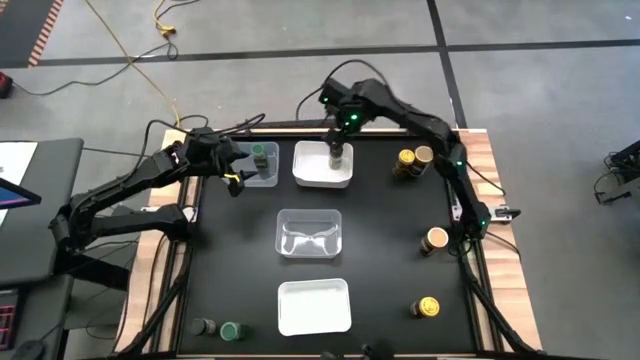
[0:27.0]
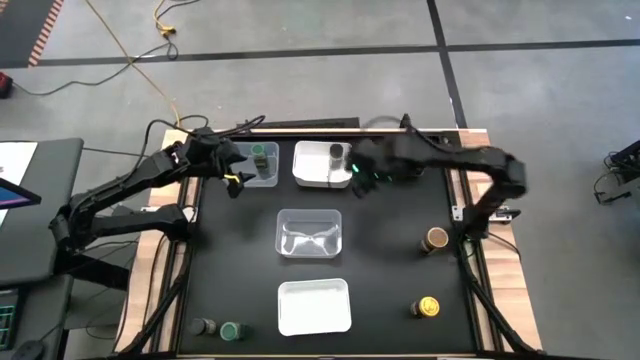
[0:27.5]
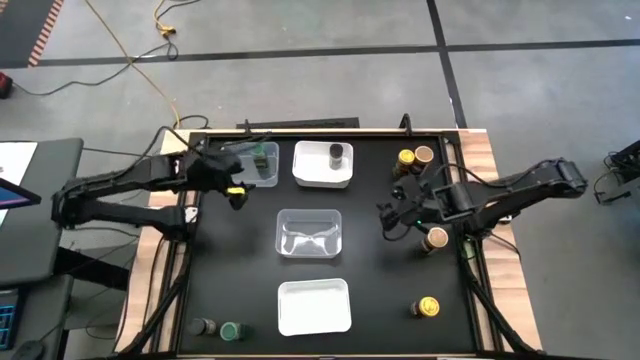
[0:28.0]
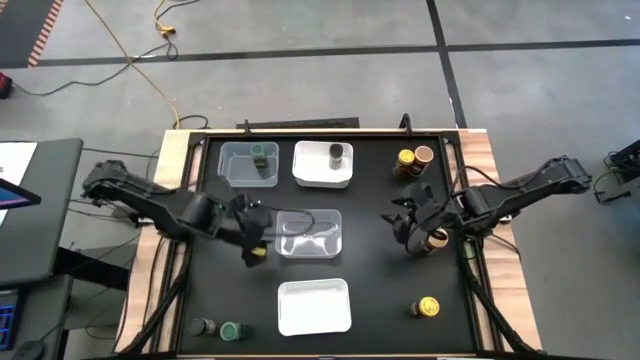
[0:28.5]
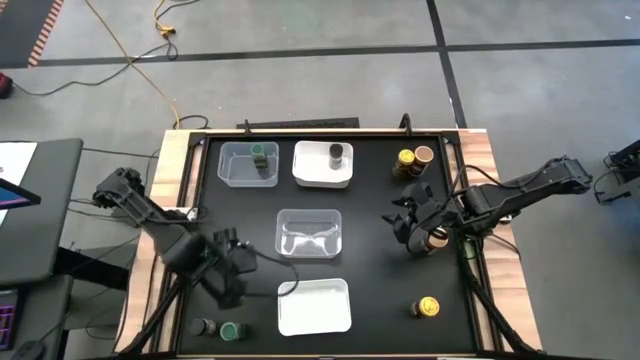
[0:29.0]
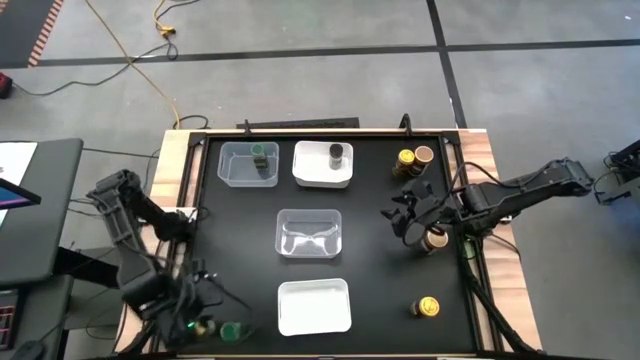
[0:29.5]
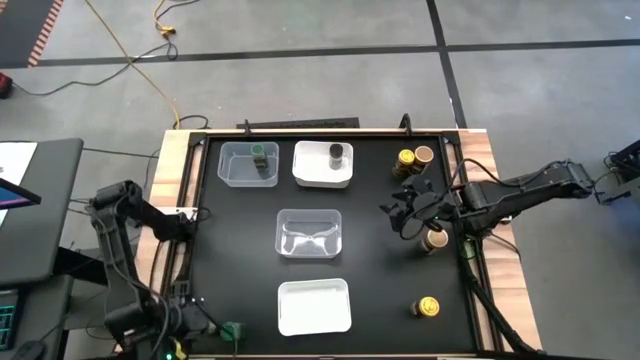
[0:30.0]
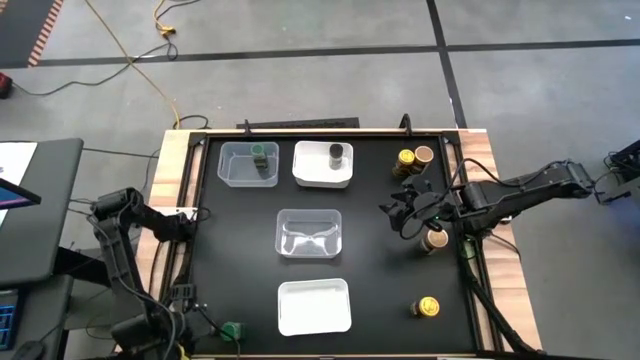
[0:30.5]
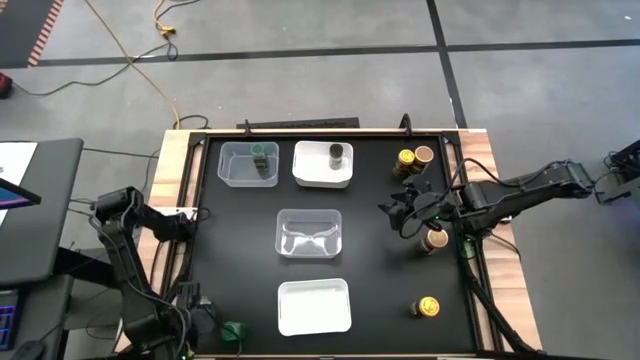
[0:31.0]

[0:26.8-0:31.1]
Task: Sort spices by type
Put the black seasoning bottle into the top white bin

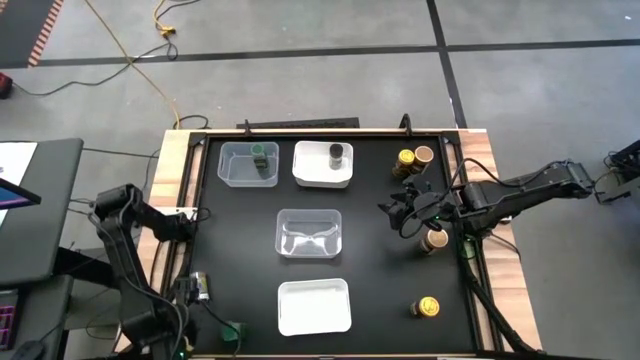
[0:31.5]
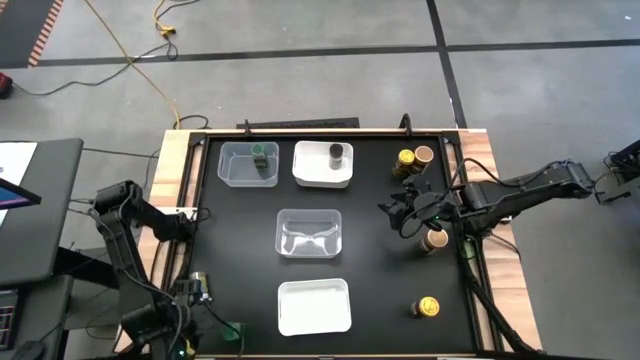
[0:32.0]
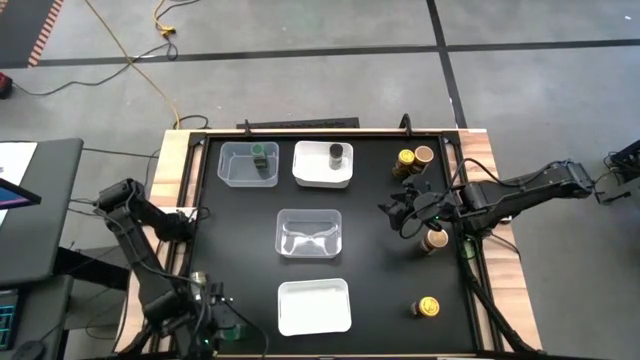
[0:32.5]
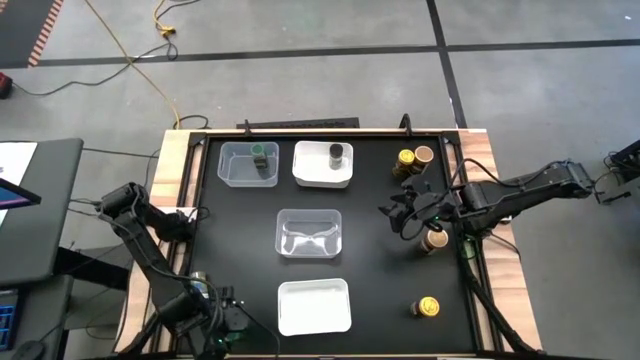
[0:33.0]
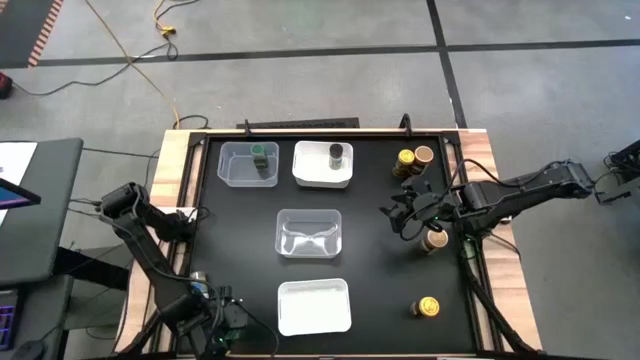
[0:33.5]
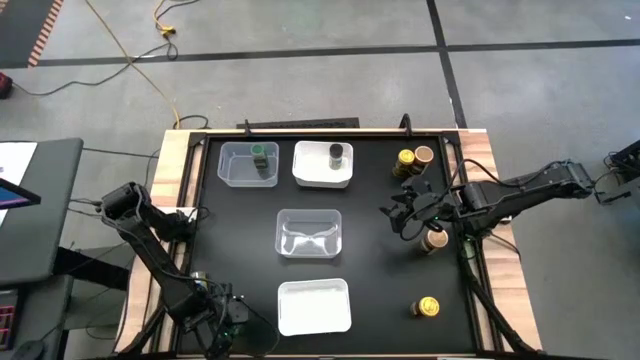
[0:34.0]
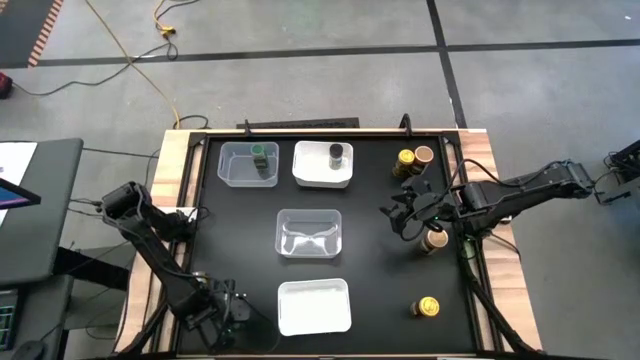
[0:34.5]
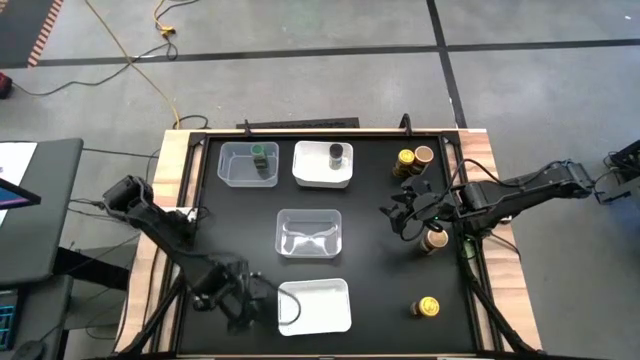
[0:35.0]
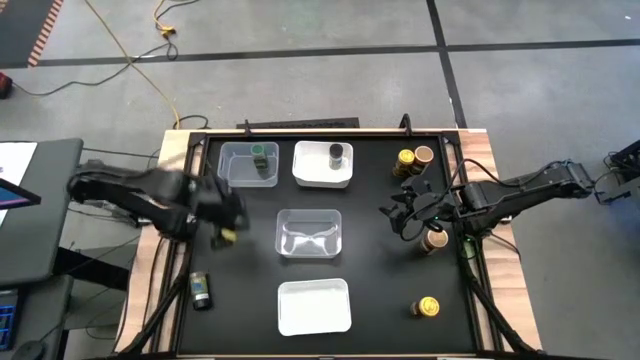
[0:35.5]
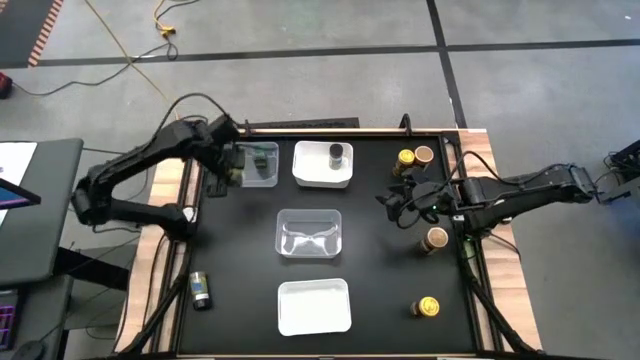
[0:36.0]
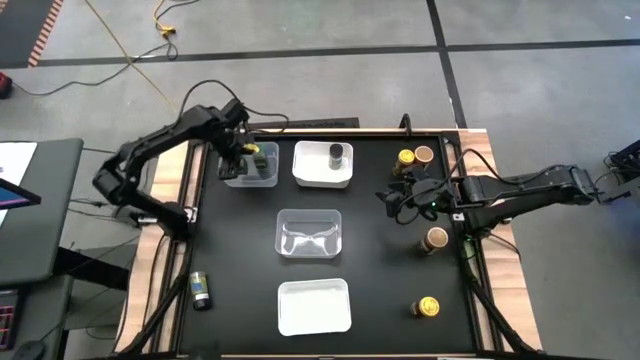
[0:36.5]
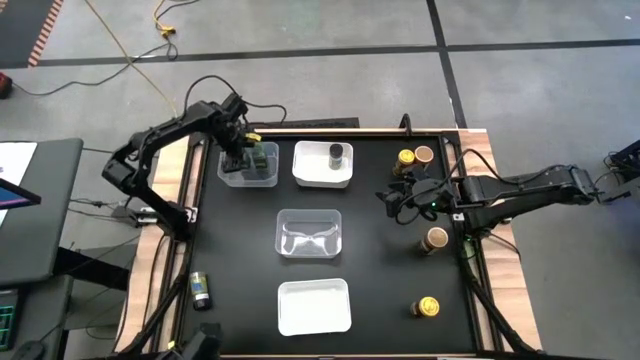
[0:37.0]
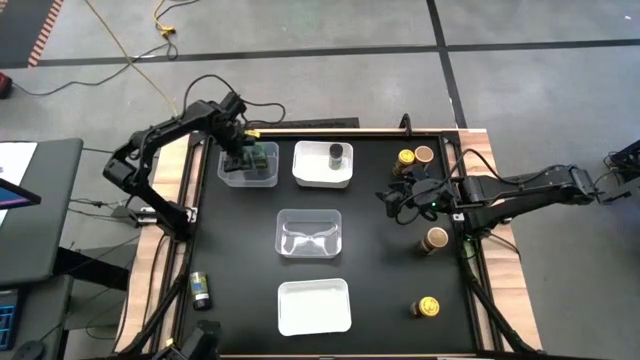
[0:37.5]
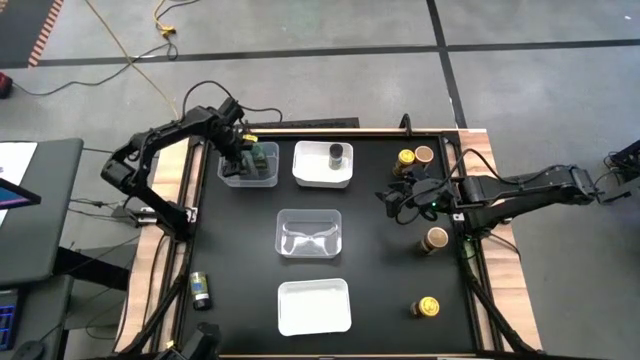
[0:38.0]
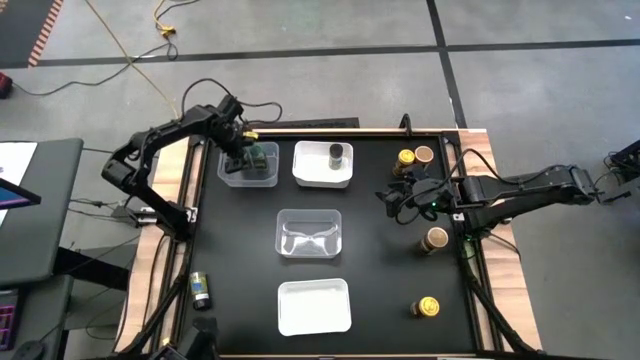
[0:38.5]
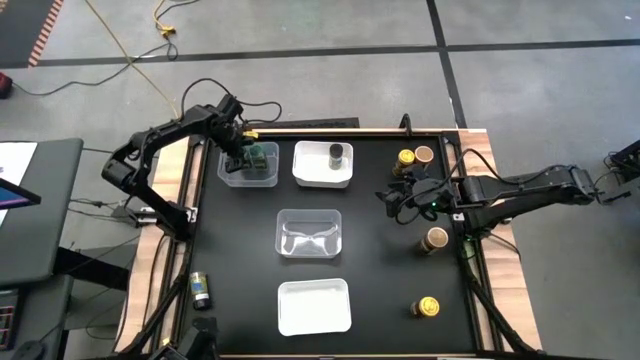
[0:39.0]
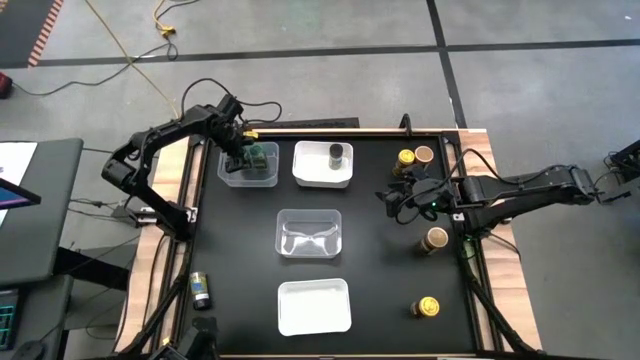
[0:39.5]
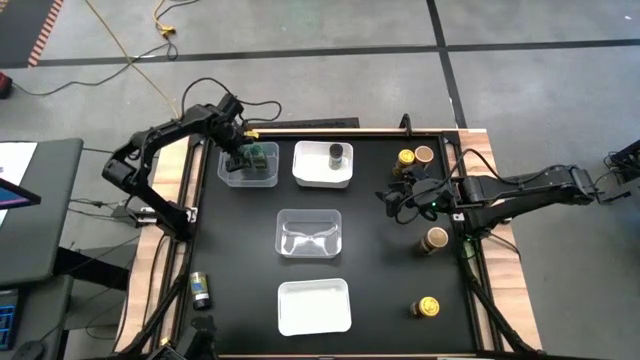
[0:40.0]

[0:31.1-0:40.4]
Put the green seasoning bottle into the top transparent bin

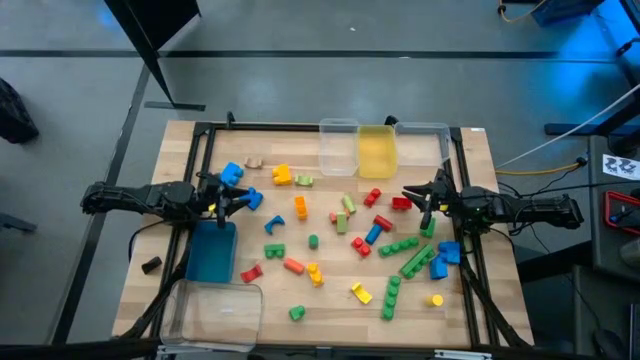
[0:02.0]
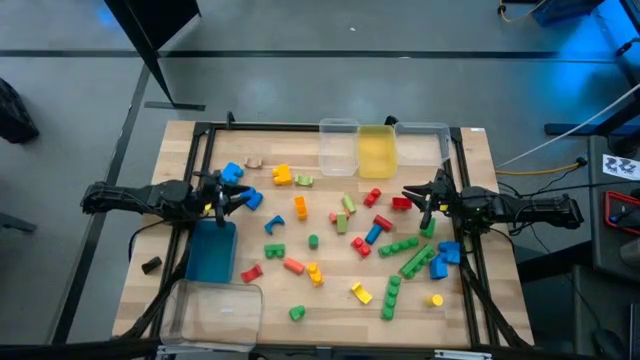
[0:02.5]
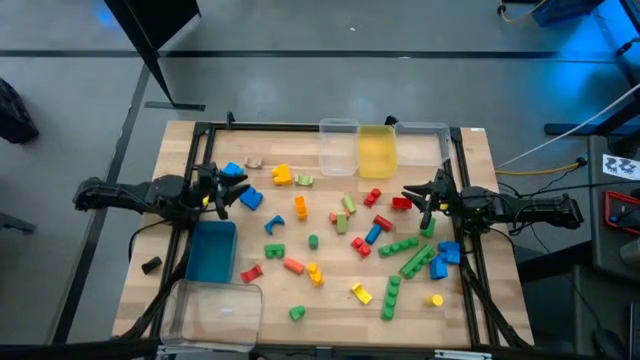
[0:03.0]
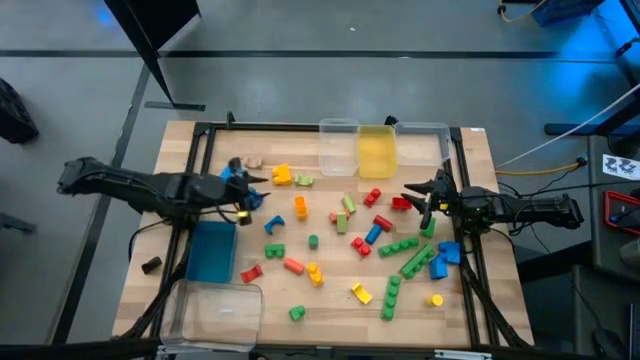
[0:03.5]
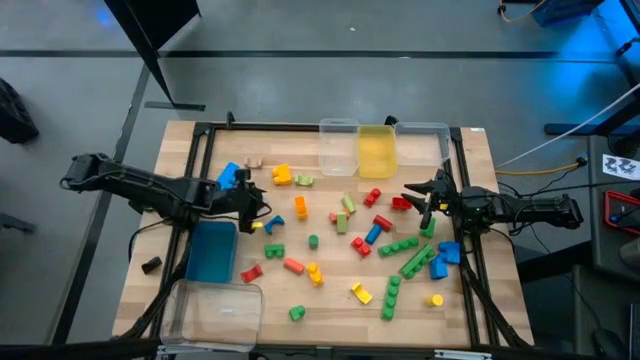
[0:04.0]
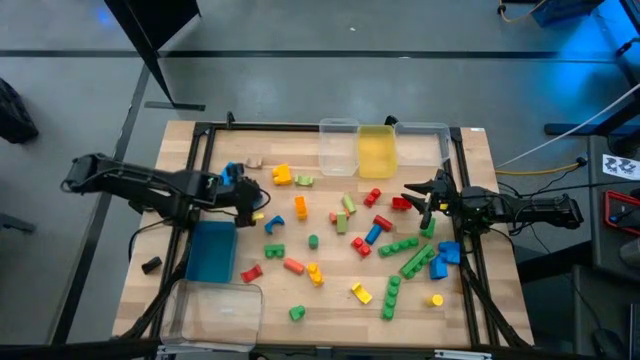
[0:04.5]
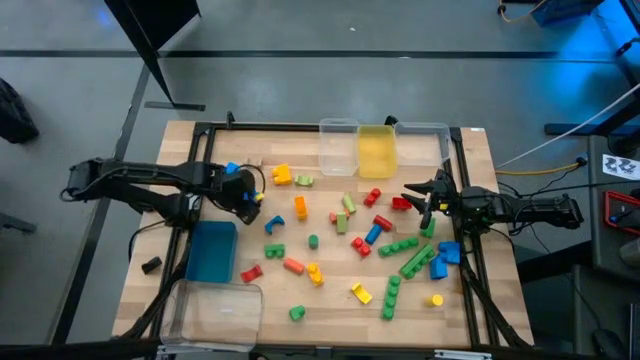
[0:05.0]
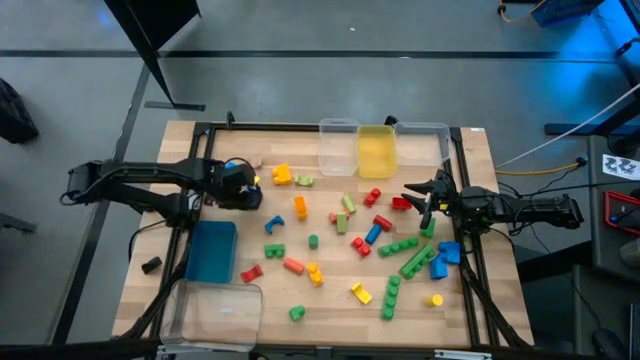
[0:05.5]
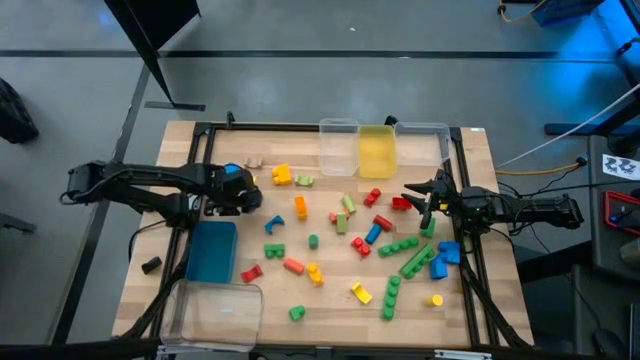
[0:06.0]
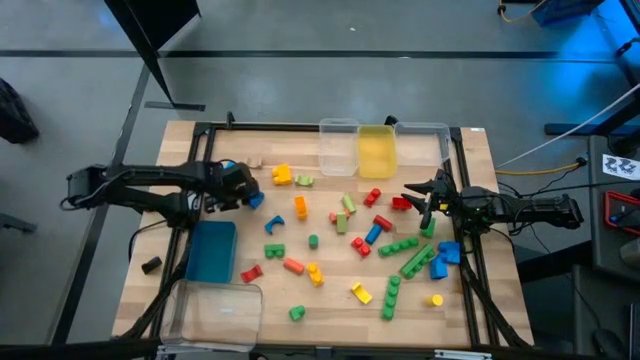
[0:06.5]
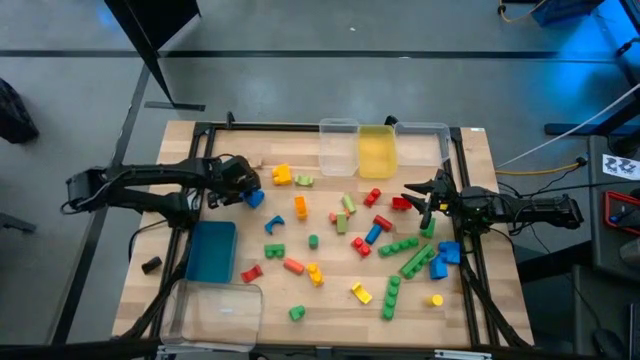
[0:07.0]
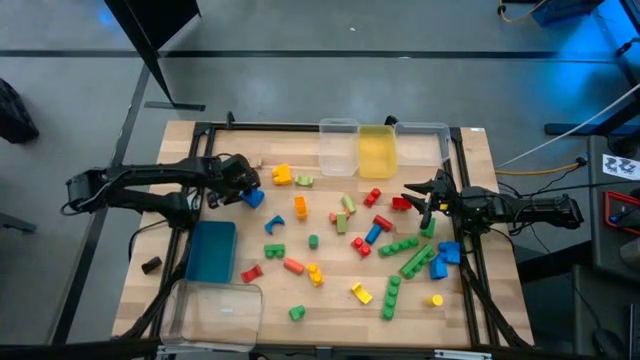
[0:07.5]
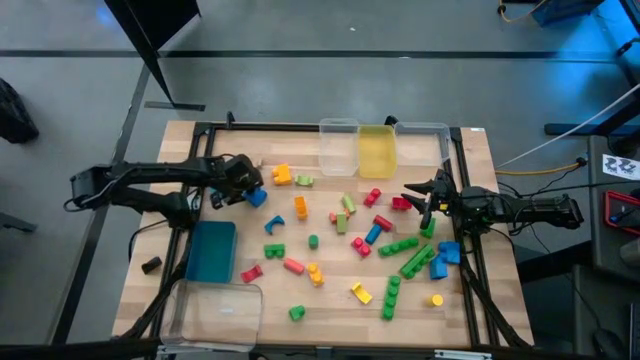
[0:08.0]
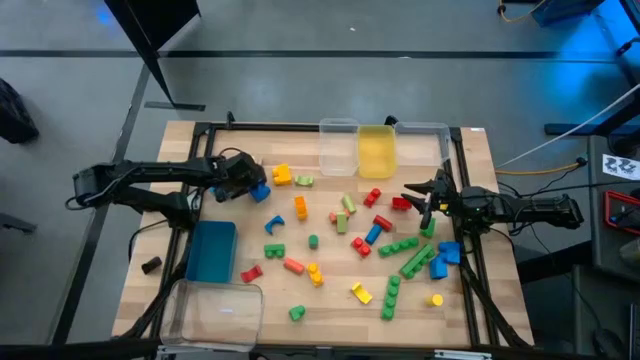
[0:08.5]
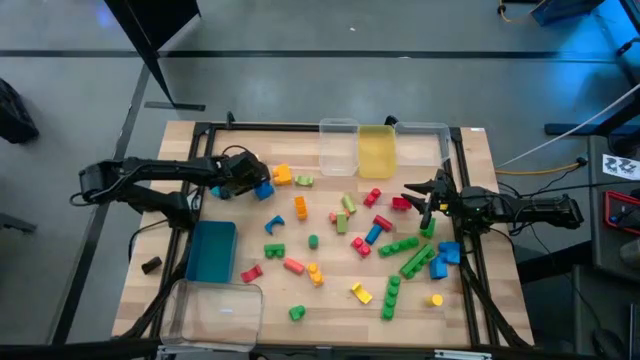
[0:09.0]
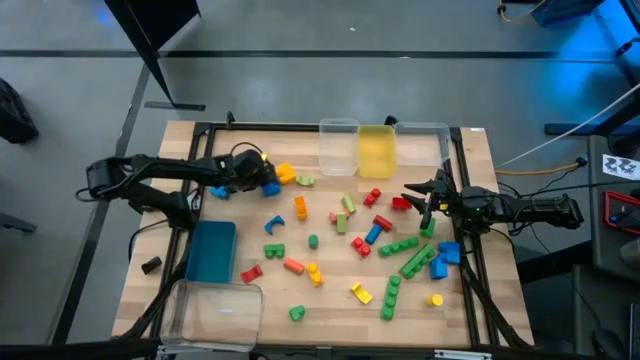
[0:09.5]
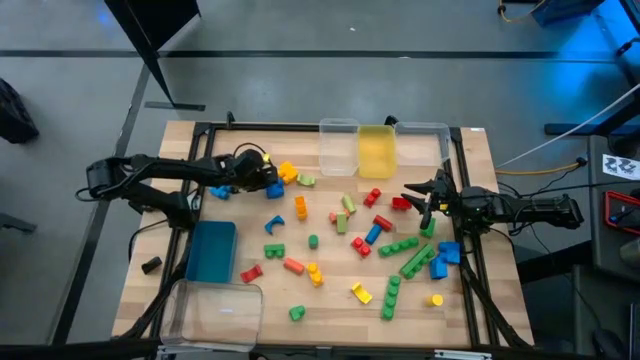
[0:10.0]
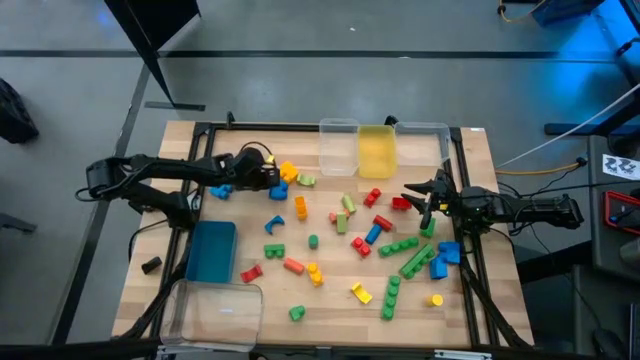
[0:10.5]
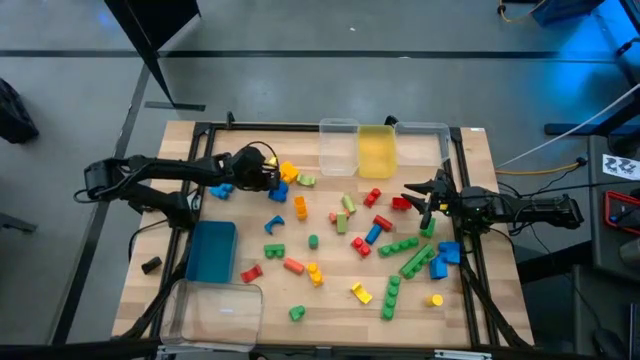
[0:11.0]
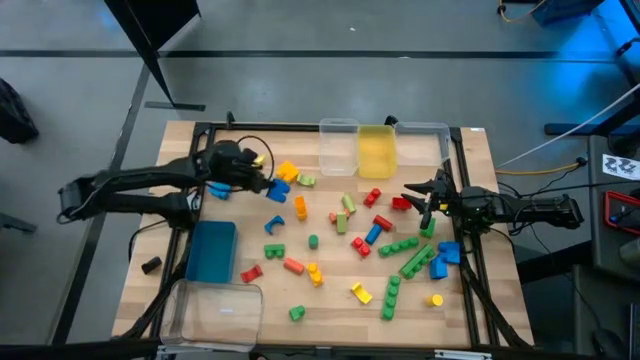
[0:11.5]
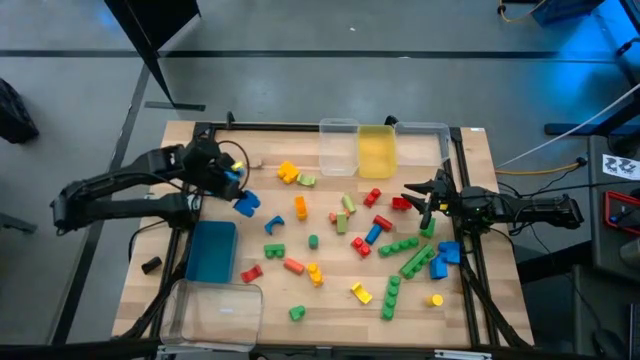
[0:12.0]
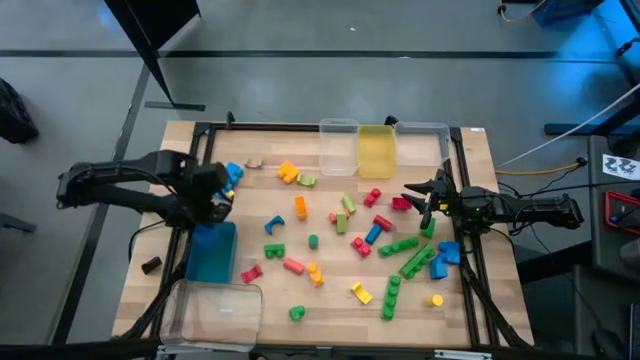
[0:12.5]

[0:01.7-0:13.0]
Task: Sort blocks by size
Put the blue 2 stud game piece into the blue bin
